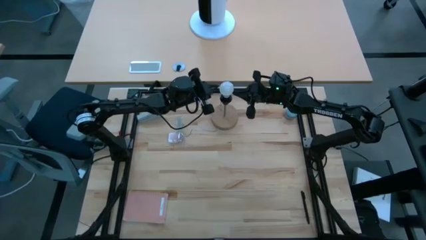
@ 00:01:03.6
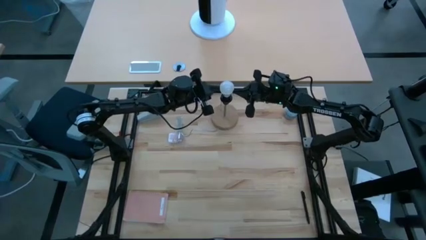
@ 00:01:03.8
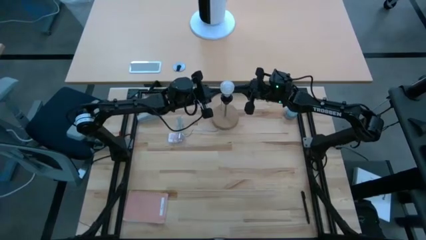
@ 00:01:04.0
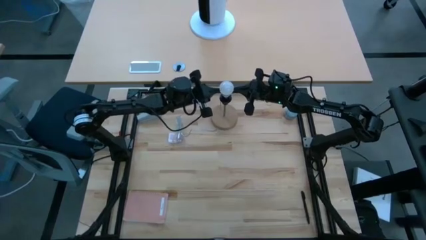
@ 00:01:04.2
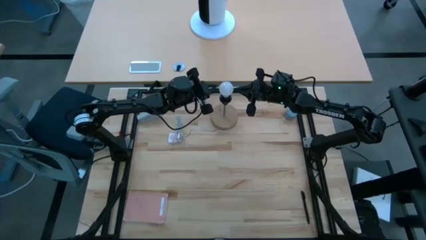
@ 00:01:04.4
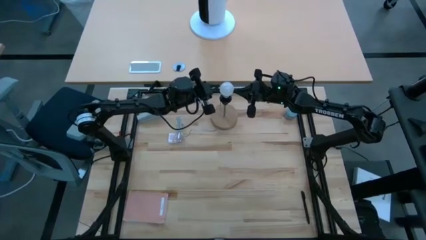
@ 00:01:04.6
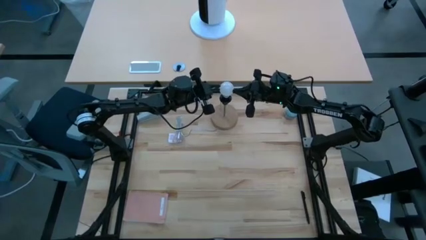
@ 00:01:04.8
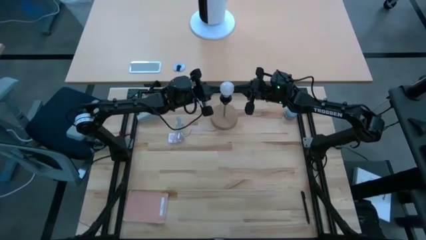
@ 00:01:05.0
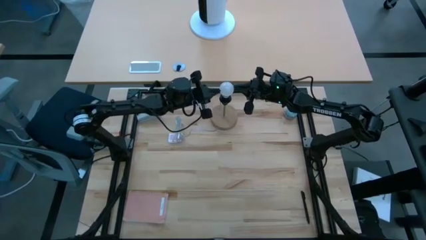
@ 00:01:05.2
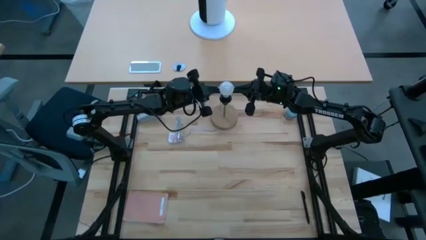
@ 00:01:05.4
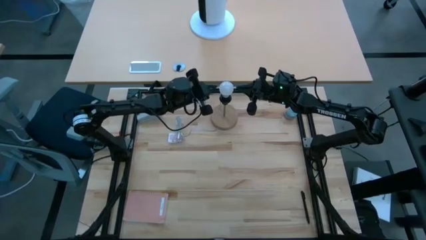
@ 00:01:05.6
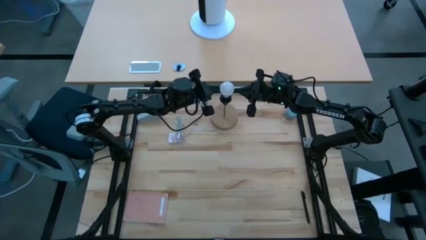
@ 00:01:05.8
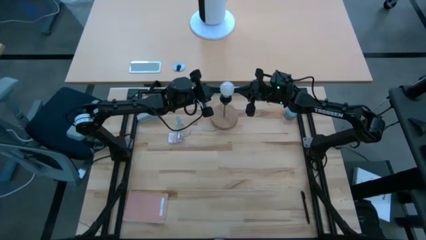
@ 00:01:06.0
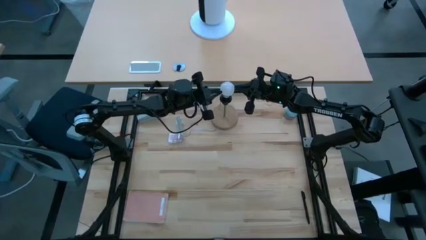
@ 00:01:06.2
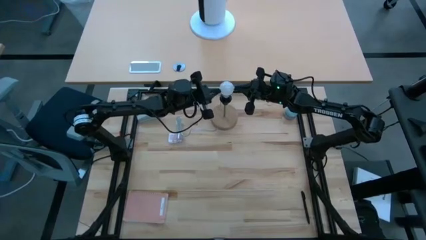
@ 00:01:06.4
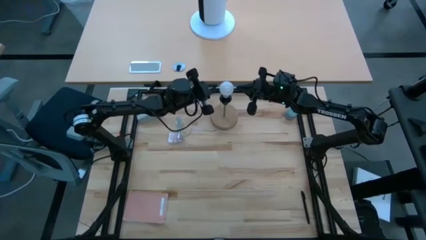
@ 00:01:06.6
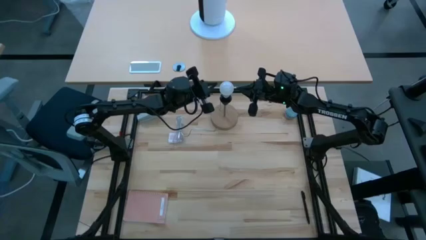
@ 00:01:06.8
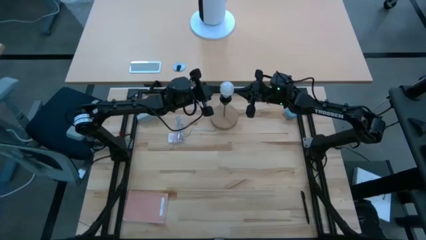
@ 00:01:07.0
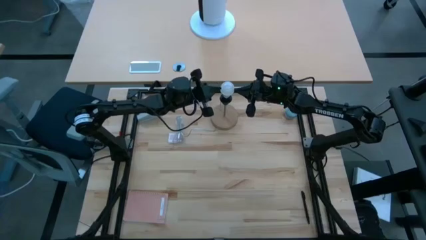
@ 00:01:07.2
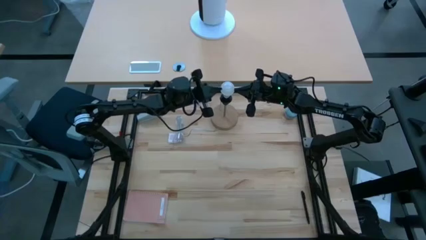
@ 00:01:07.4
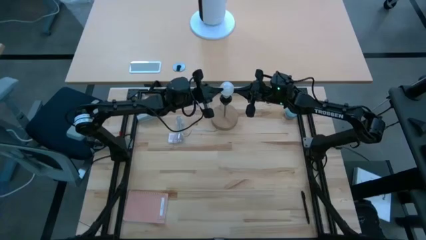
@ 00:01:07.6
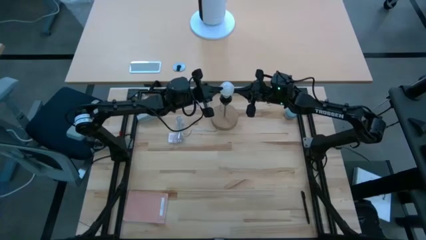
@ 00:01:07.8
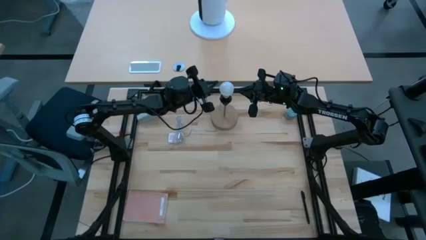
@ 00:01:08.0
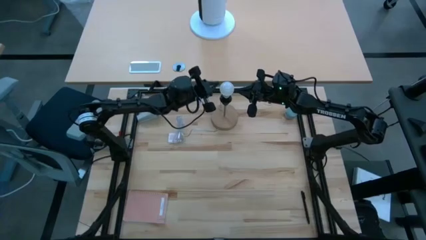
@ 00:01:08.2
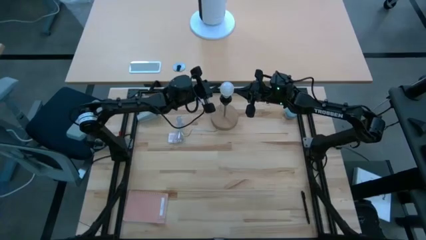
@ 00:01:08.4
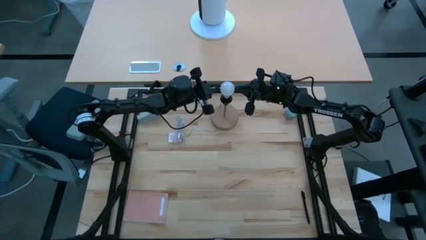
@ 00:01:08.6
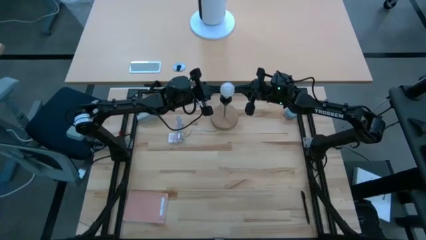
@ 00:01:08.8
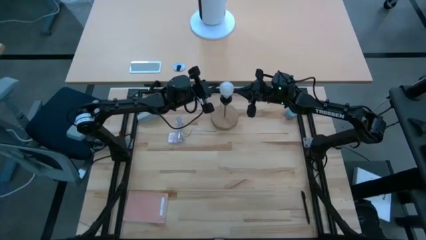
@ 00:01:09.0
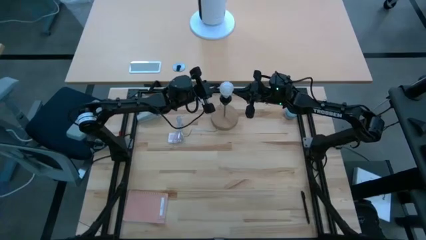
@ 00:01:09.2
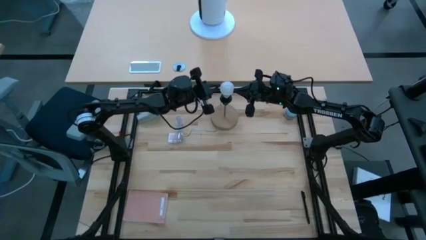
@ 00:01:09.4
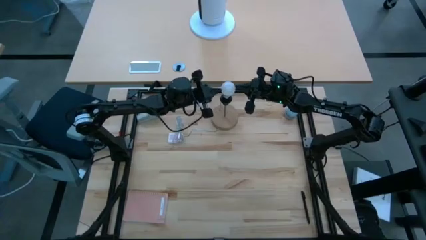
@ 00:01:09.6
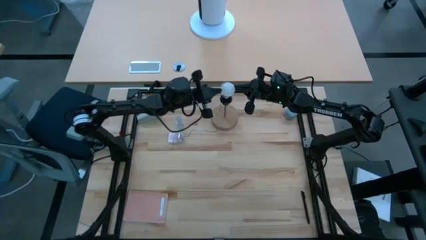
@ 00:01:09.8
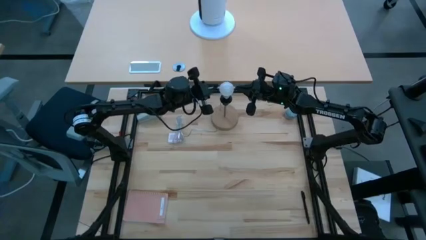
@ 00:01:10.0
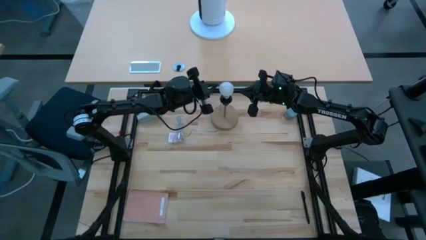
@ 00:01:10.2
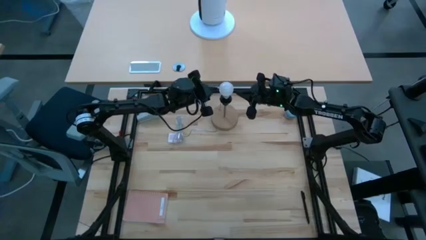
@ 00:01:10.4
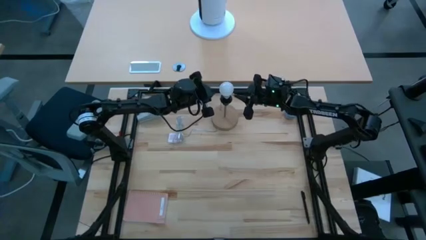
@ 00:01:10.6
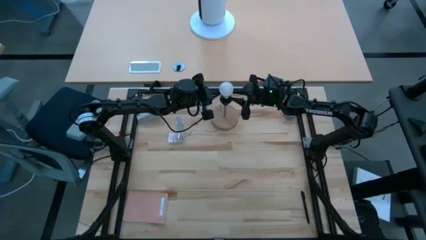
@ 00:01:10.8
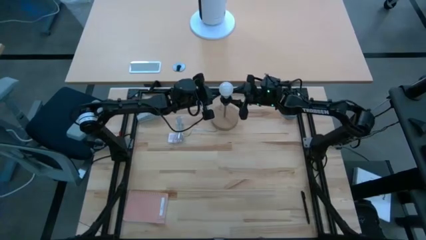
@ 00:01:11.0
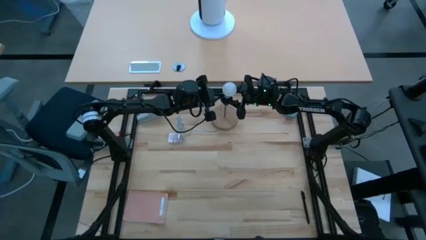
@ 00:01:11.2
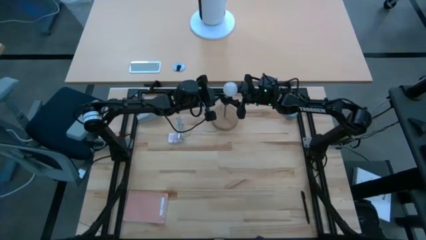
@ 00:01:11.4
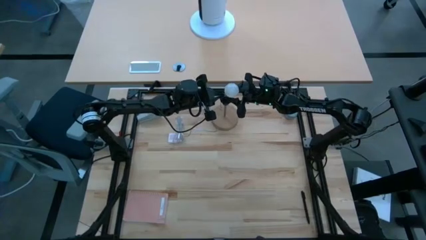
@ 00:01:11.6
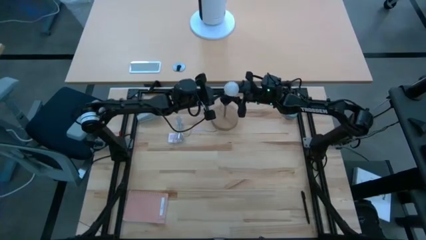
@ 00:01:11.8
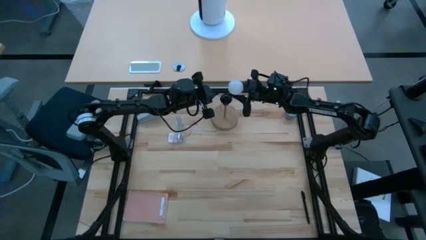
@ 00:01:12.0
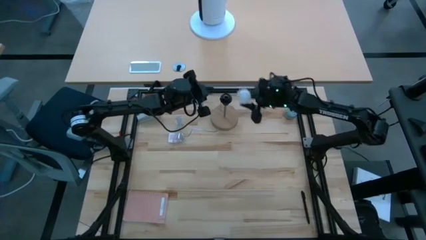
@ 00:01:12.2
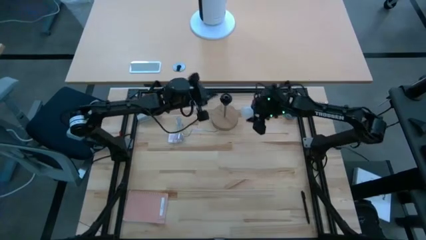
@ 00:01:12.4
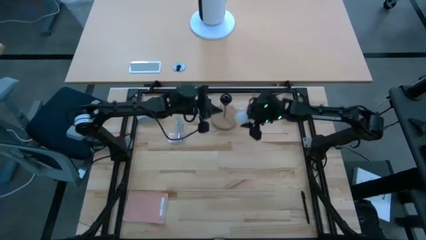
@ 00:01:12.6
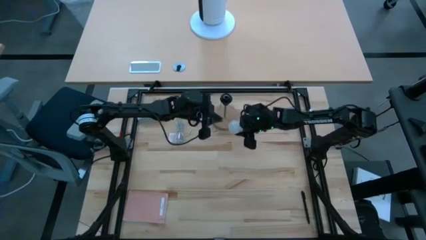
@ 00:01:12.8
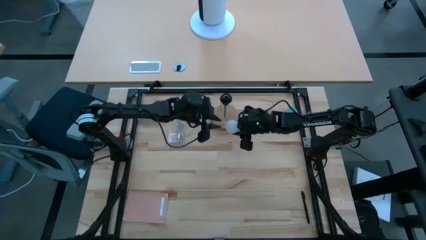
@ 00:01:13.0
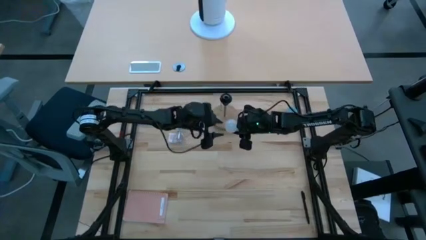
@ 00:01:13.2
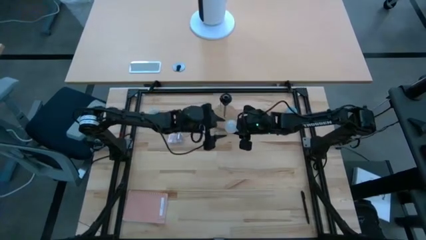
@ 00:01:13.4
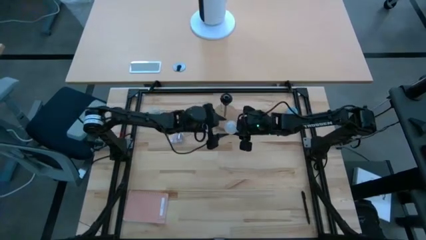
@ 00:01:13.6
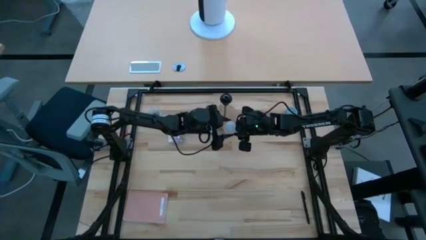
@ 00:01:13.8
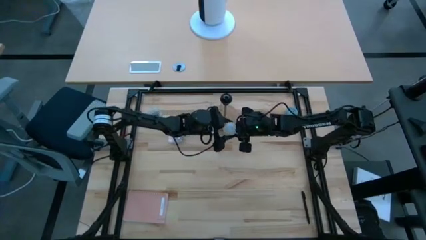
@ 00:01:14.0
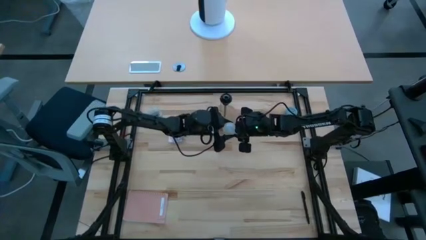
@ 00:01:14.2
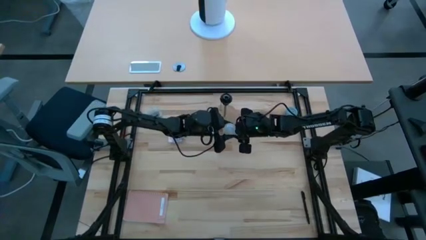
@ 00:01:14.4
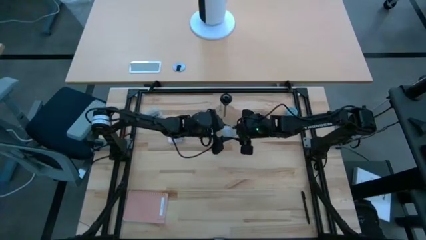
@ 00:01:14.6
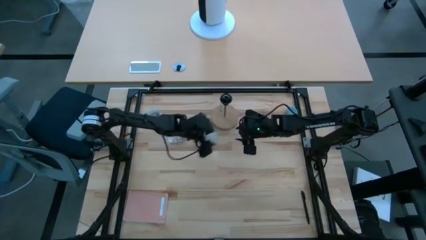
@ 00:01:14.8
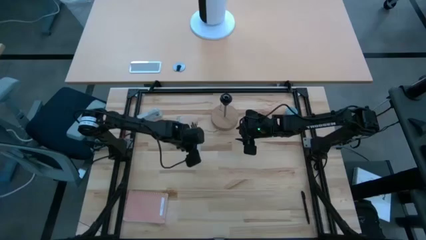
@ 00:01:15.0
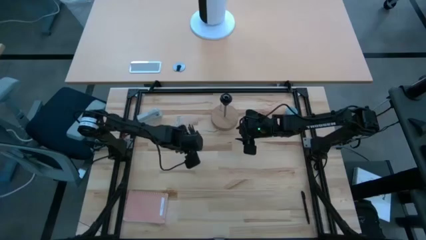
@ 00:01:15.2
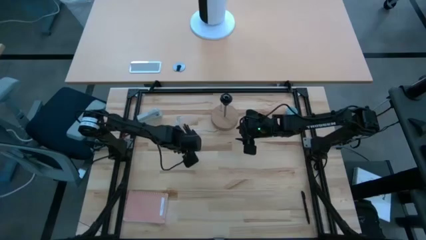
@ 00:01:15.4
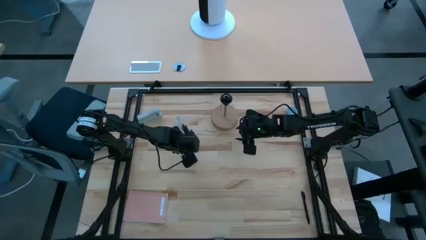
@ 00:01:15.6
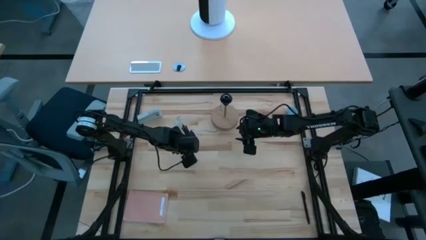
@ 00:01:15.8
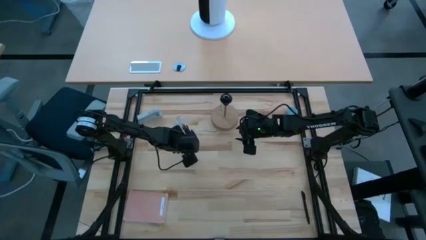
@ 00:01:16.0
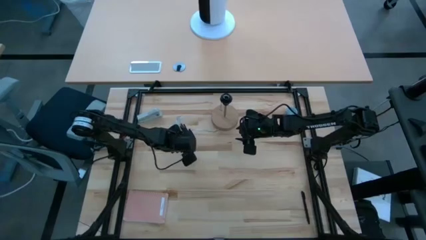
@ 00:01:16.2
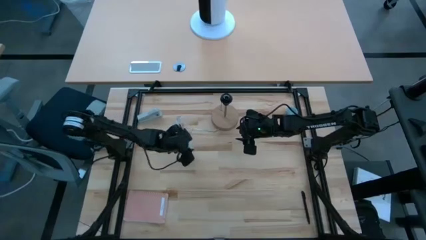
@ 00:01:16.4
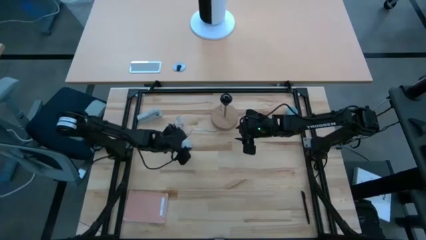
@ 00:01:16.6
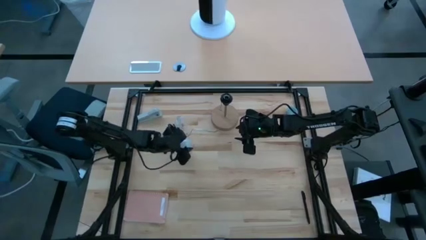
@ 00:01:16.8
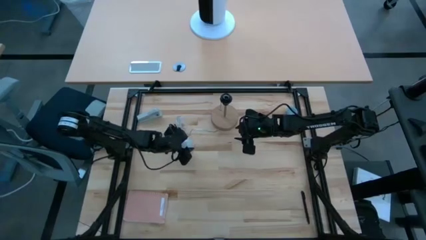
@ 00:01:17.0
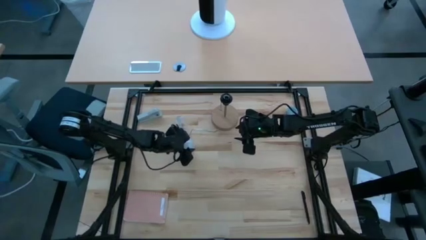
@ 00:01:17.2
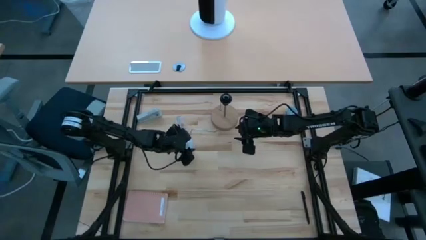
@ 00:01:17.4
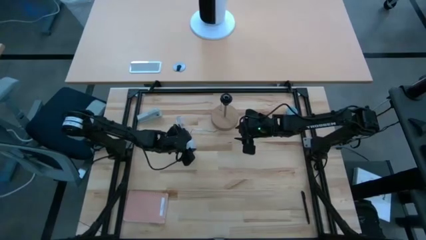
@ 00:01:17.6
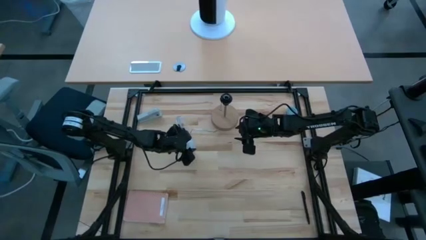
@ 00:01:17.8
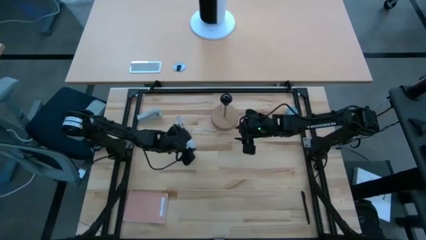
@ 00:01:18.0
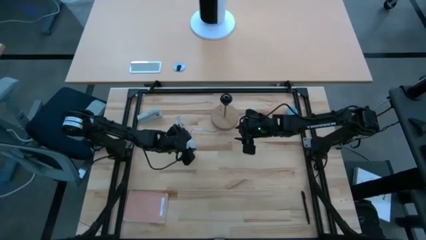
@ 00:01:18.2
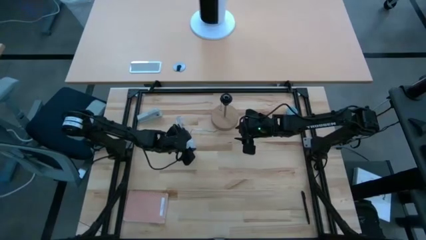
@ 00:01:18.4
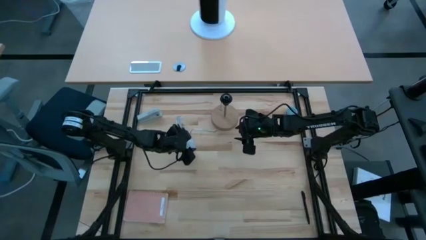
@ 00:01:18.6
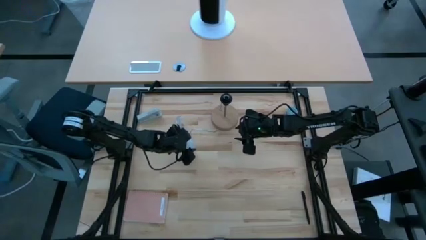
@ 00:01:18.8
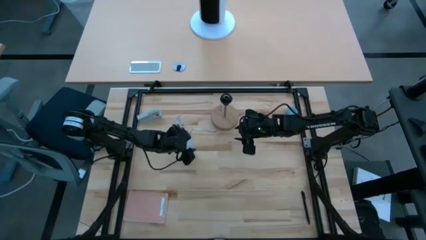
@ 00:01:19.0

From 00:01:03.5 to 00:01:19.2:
Task: Screw lightbulb
Remove the lightbulb from the desk lamp
